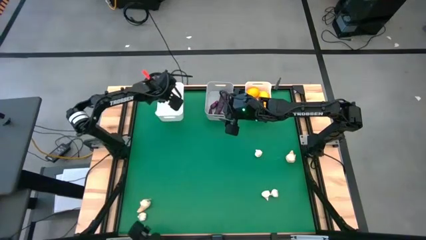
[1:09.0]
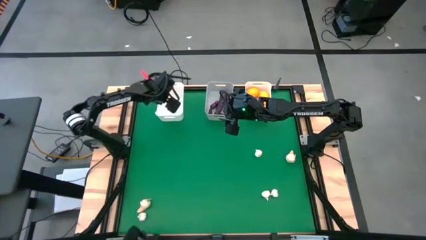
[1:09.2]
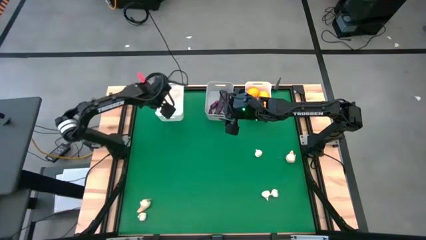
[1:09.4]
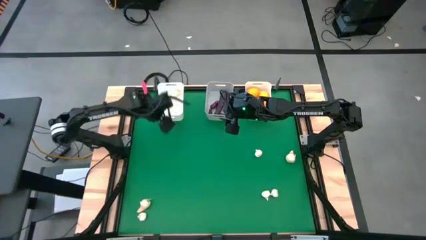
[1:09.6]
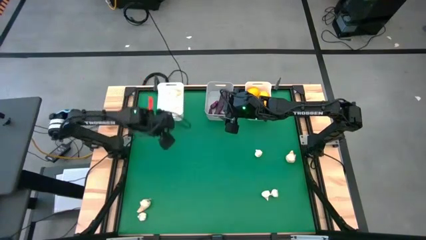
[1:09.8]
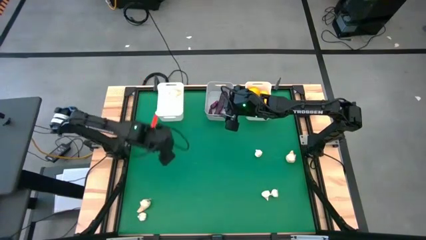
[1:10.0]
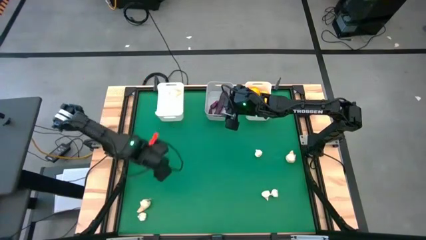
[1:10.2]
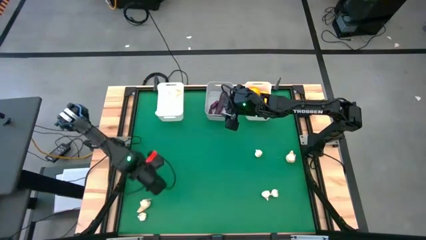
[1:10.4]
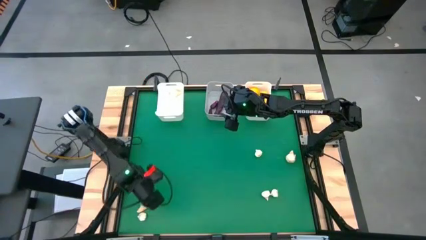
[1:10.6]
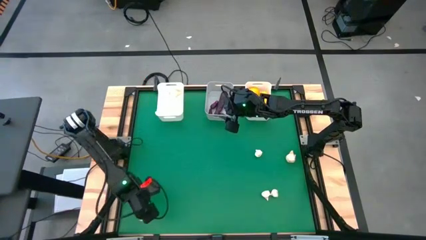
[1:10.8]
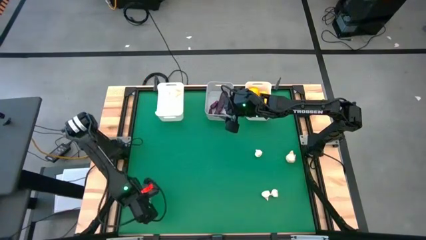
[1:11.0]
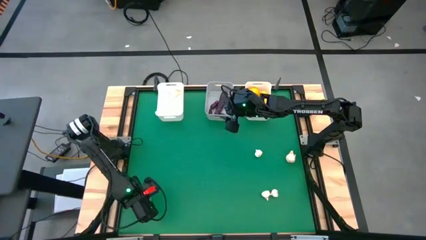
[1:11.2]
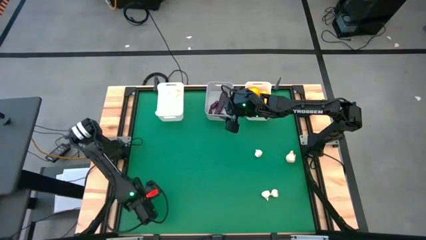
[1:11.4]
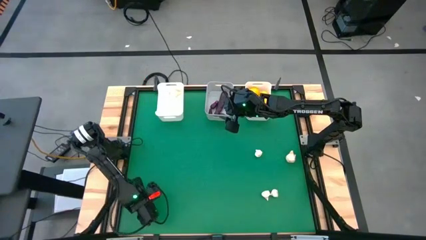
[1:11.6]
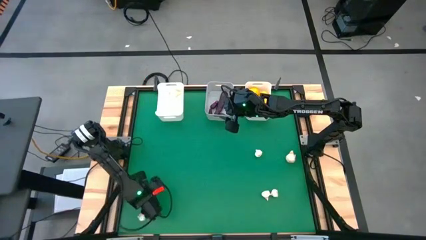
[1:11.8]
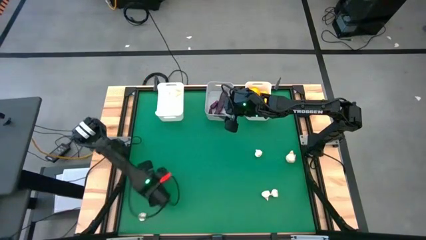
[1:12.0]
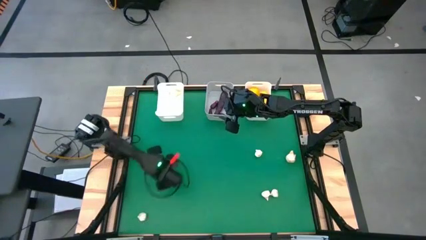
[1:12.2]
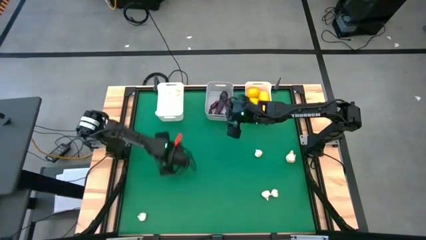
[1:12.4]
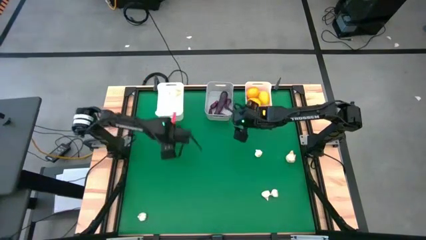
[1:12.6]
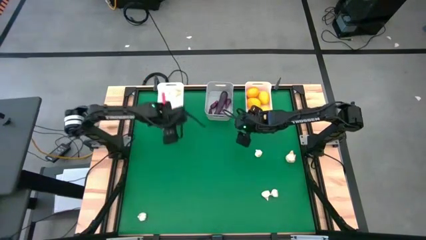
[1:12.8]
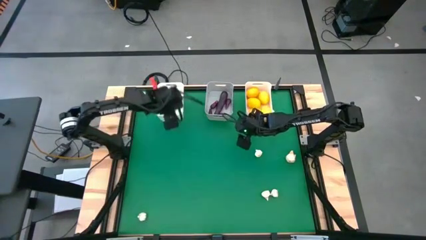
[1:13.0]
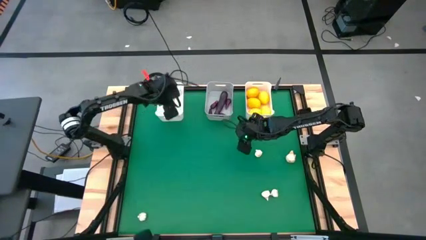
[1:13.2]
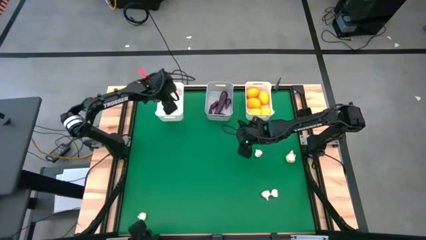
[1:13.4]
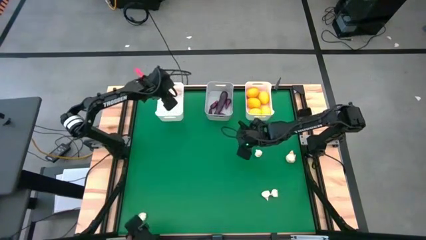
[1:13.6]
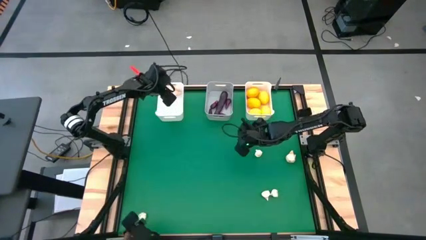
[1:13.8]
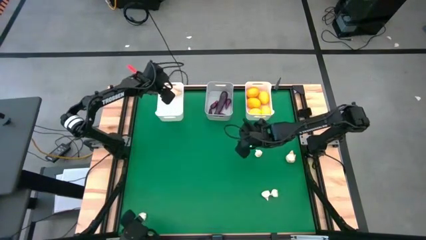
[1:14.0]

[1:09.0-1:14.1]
Task: Sort produce into baskets
Put the garlic into the left white bin

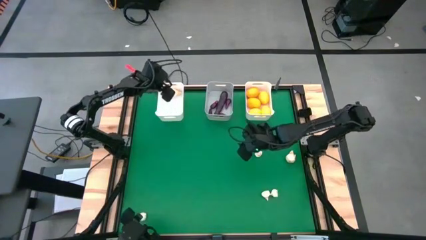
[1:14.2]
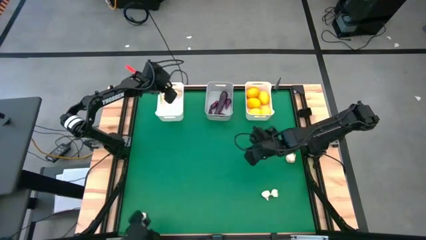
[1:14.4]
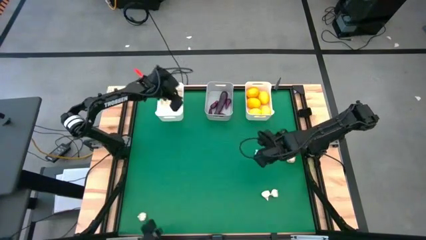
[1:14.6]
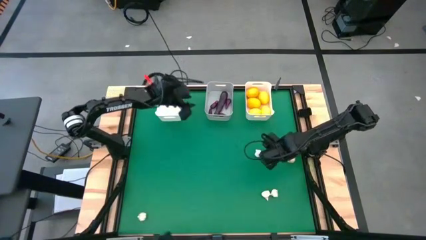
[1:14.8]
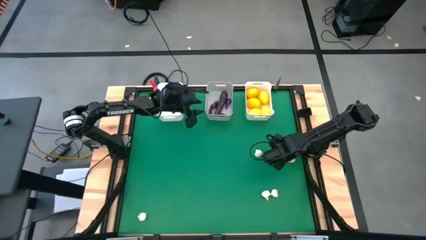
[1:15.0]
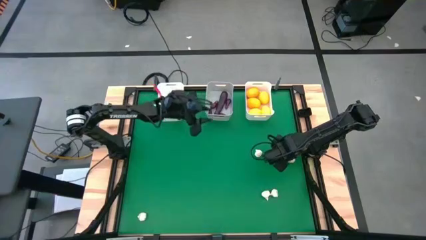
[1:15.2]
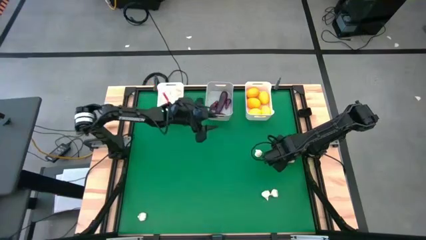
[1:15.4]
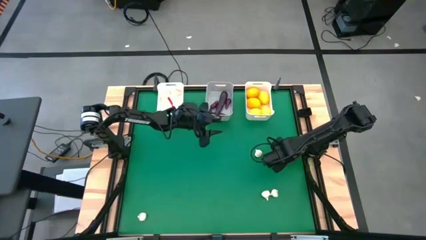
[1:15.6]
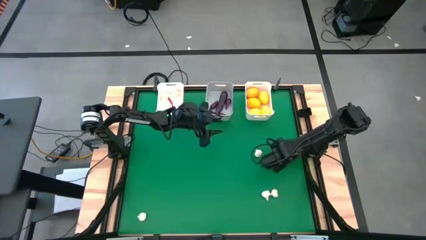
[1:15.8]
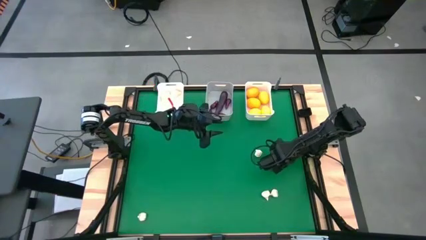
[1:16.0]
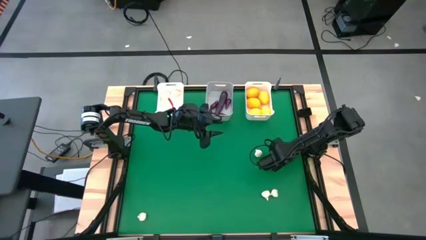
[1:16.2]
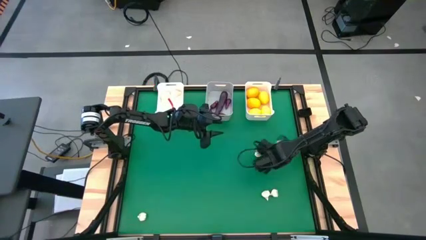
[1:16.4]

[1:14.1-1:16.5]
Put the garlic into the left white bin

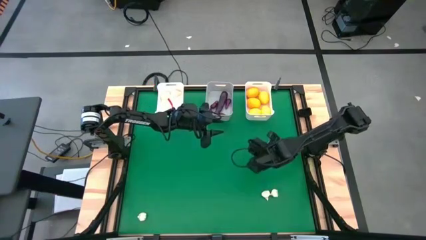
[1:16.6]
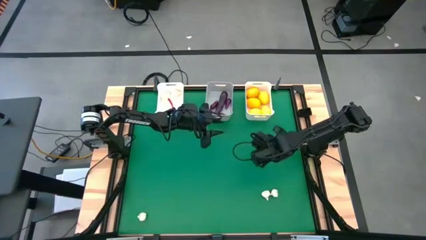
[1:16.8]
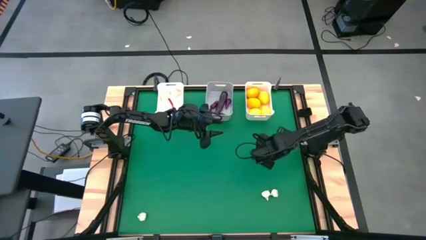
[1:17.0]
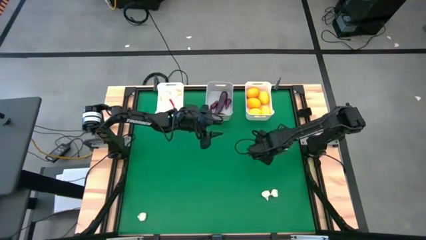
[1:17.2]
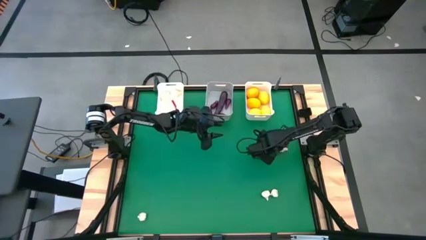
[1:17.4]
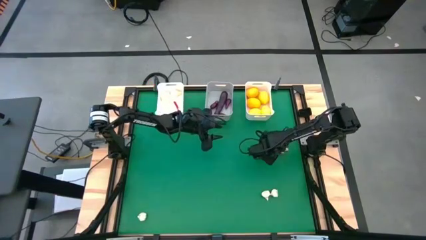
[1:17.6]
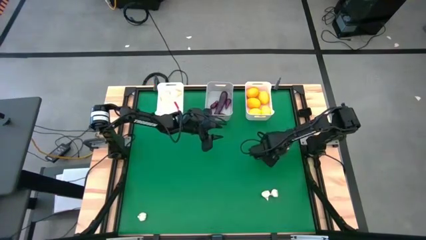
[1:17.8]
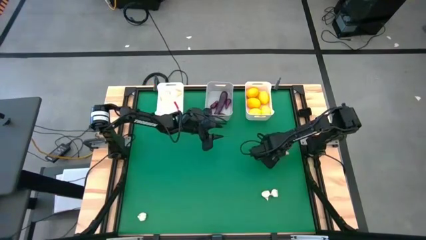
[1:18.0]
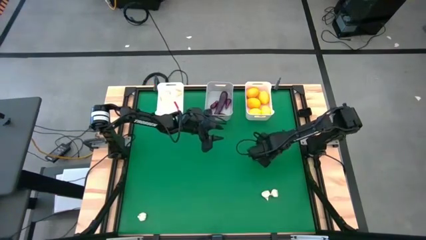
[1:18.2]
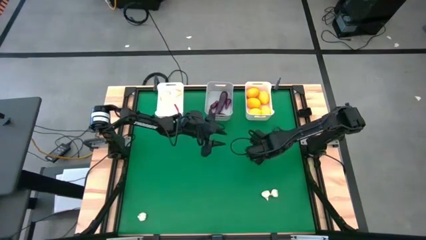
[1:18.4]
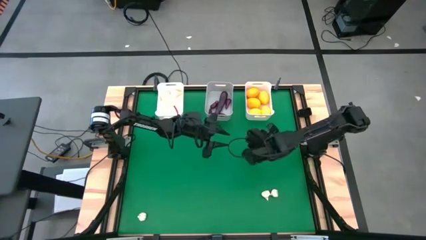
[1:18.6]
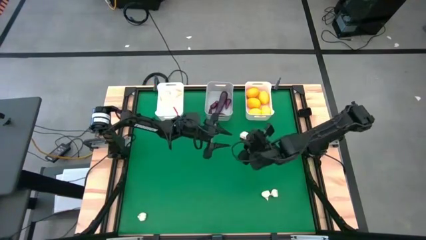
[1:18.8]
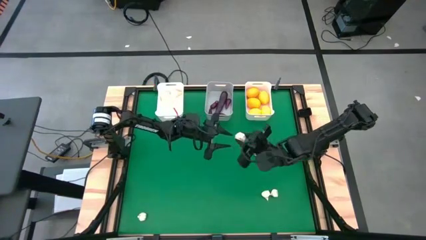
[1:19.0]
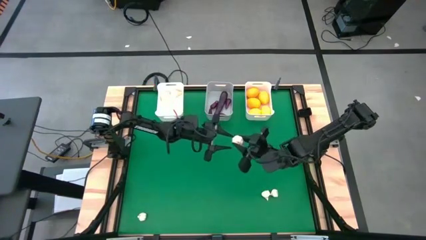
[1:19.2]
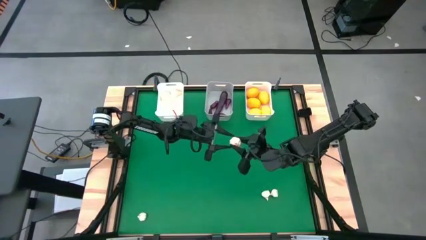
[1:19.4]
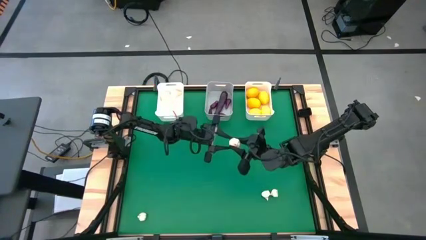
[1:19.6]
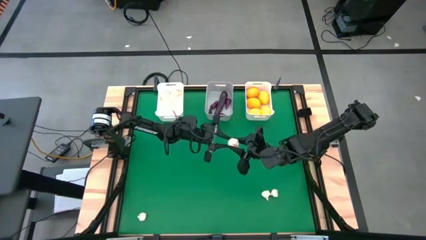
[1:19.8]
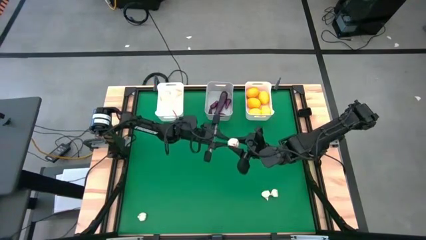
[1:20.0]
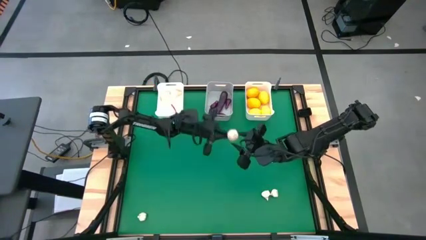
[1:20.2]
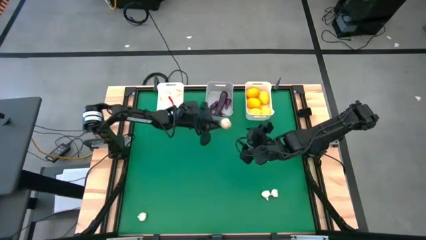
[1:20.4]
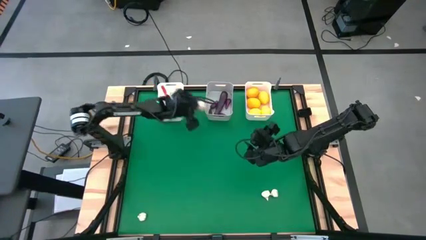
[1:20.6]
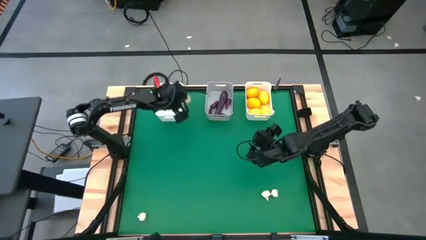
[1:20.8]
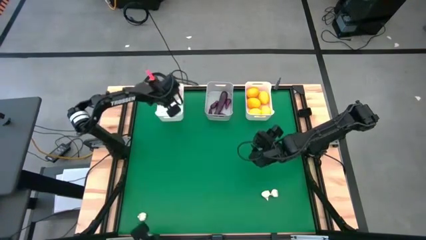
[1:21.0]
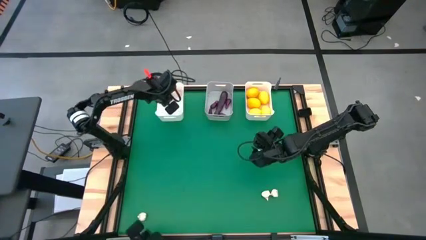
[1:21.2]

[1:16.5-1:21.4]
Put the garlic into the left white bin

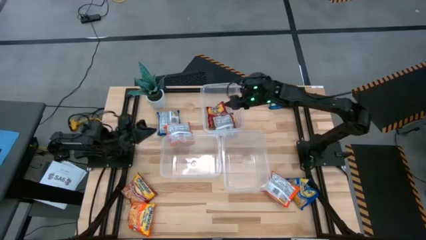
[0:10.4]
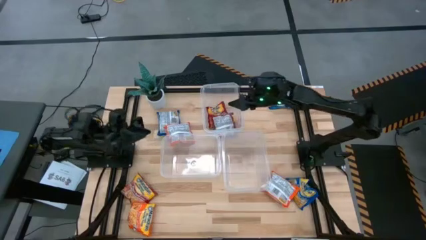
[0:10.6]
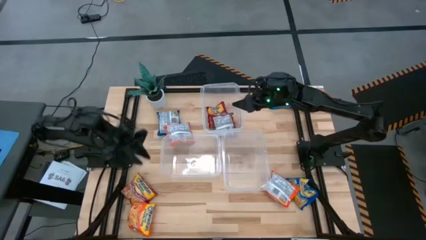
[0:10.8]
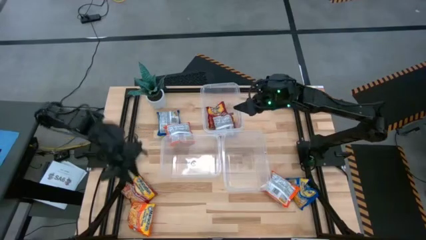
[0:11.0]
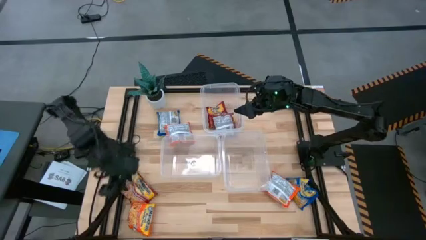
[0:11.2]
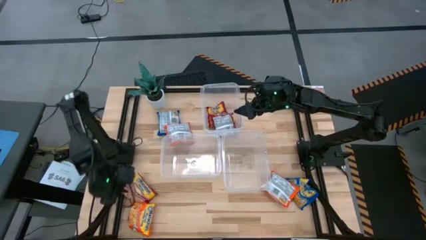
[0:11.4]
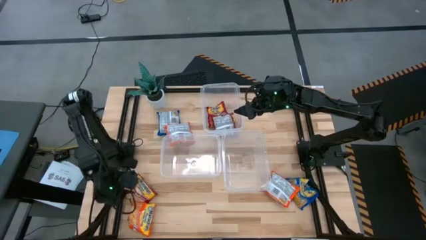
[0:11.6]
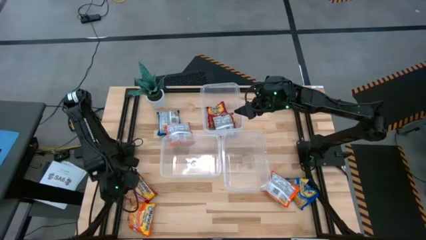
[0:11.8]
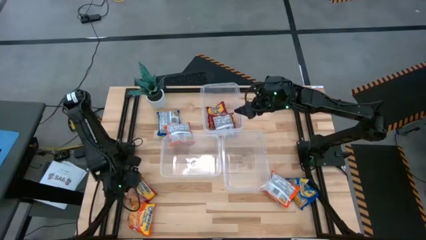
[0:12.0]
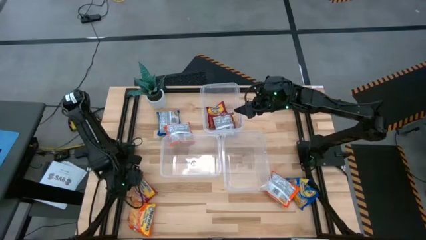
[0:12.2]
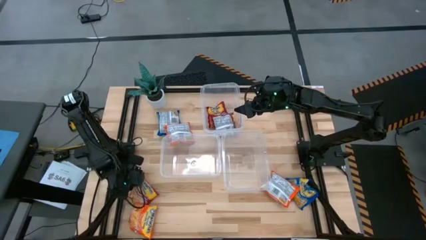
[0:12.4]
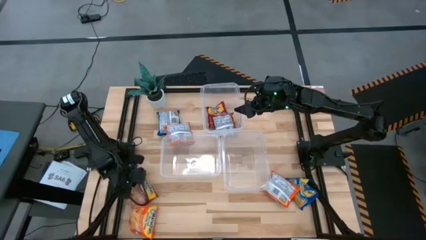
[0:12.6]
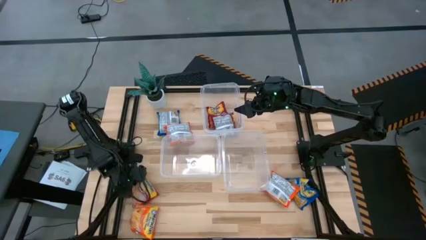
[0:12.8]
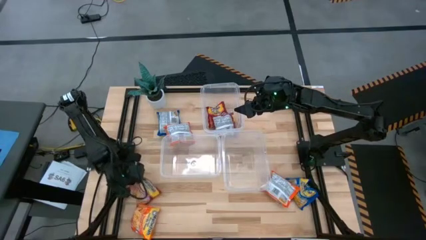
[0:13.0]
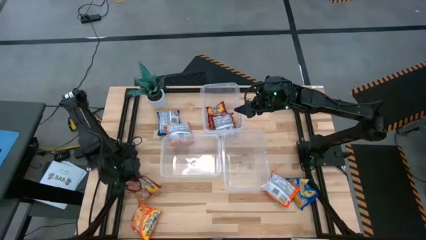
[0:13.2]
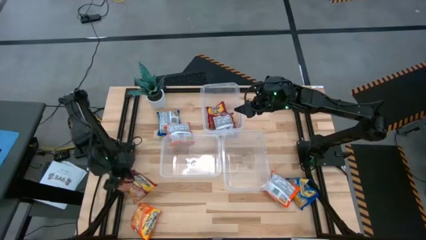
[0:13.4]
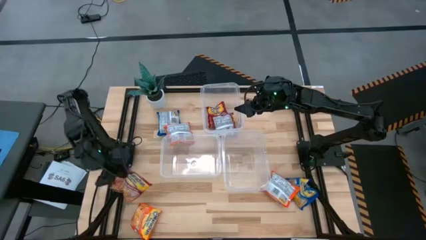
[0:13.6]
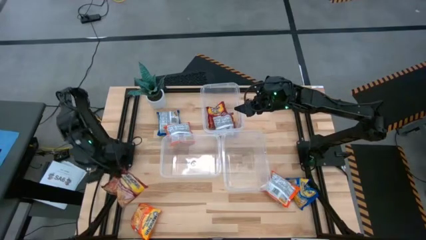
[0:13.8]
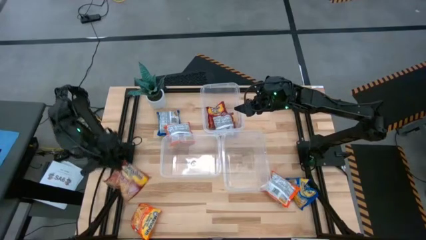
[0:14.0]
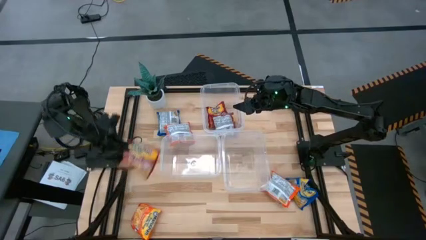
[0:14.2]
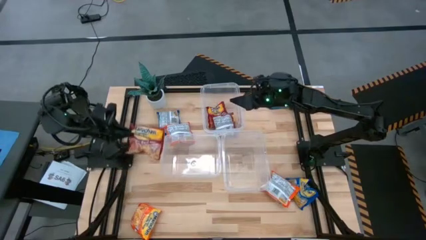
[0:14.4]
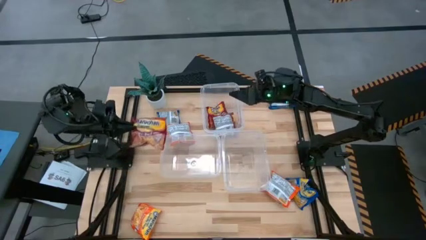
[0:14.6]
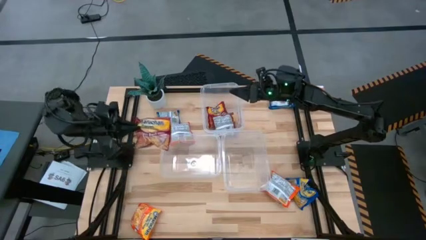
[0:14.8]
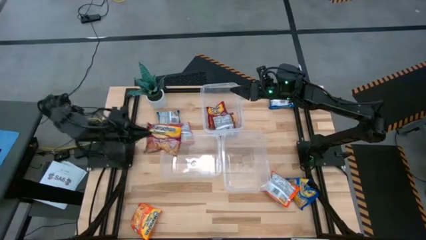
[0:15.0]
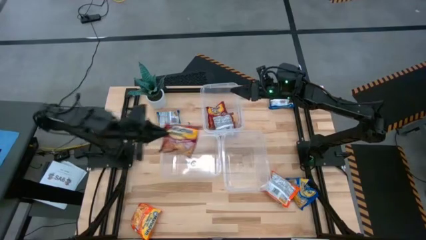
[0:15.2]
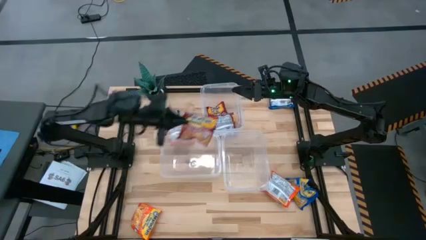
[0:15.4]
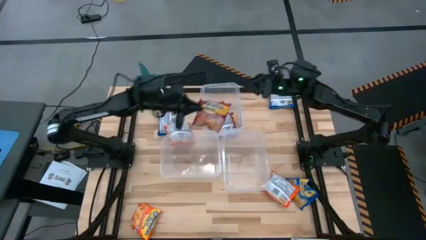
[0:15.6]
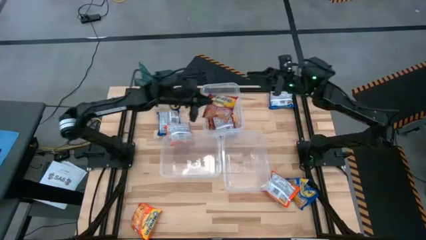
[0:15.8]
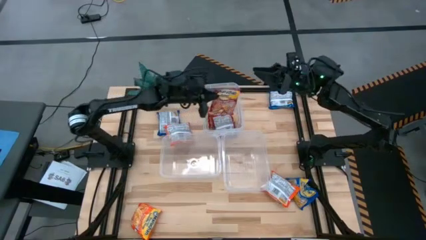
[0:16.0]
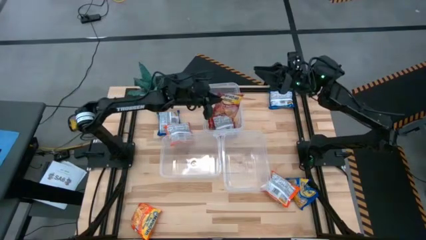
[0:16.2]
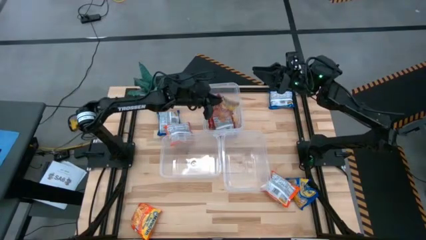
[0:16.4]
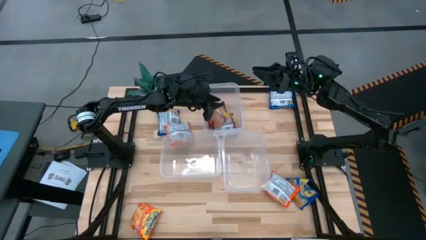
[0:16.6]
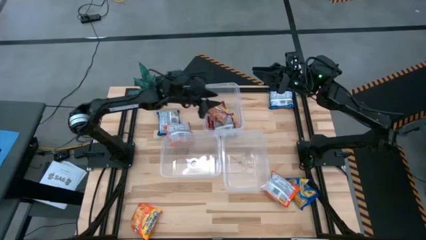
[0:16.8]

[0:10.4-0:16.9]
Task: Sort Maruchan noodles
Put the red noodle pack into the top transparent bin
